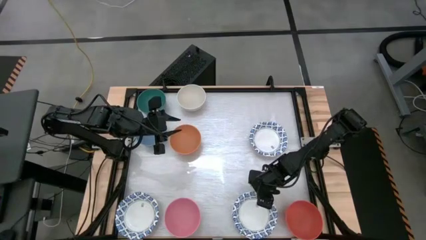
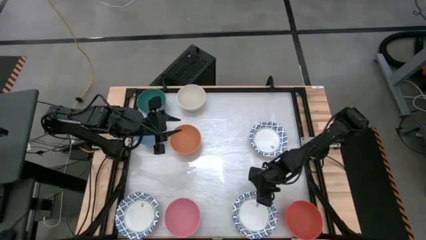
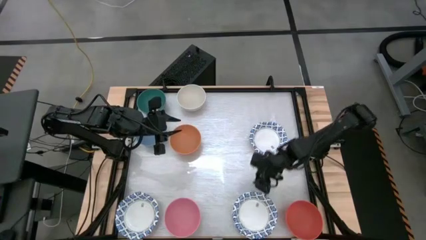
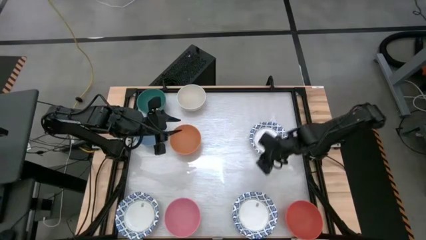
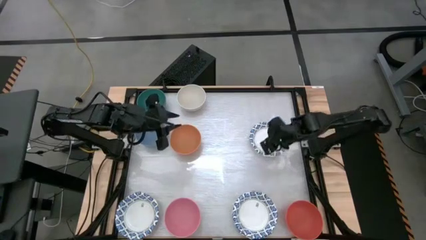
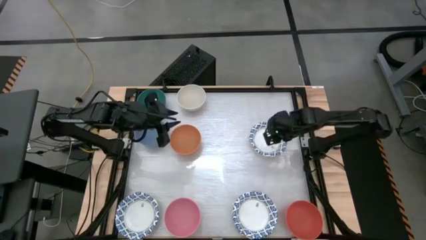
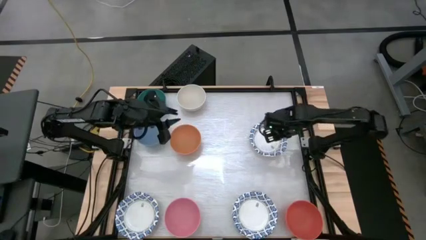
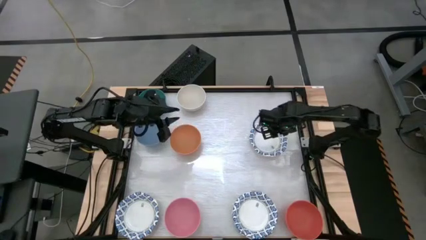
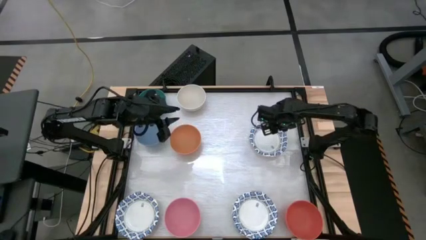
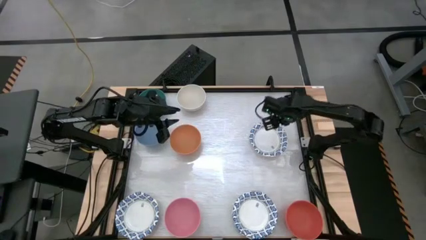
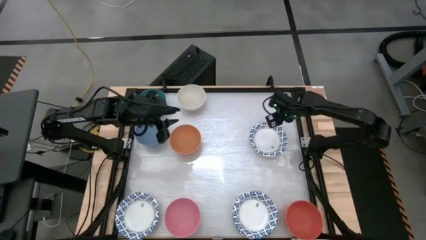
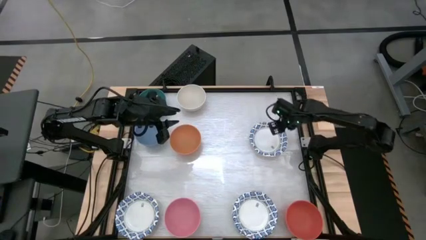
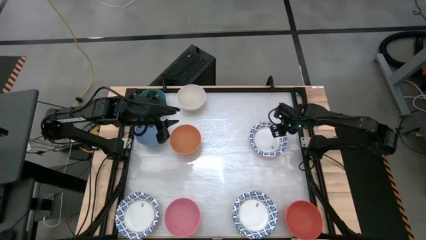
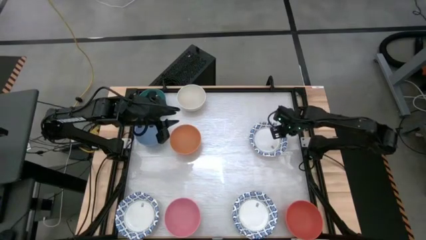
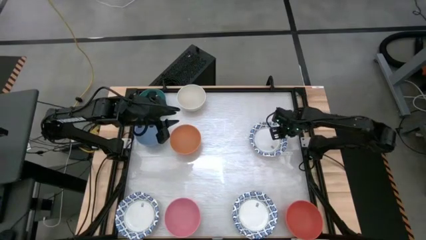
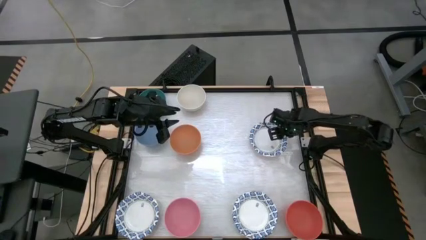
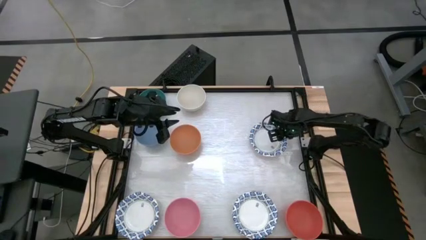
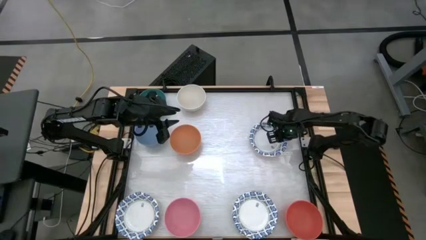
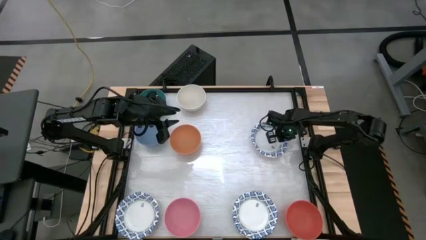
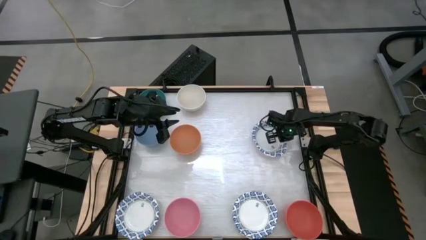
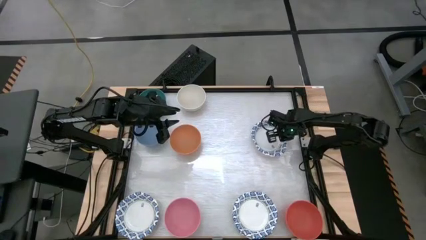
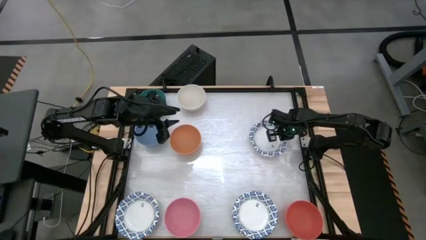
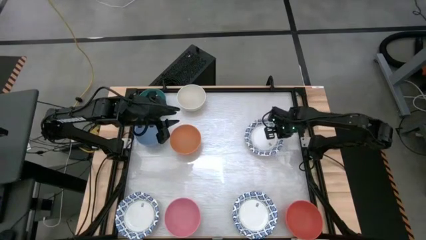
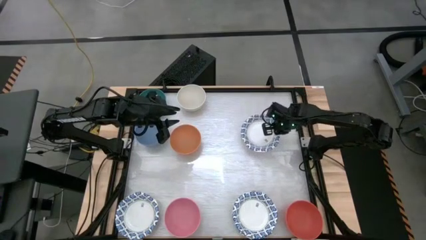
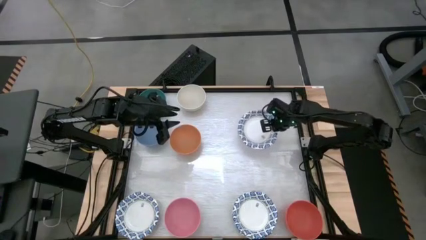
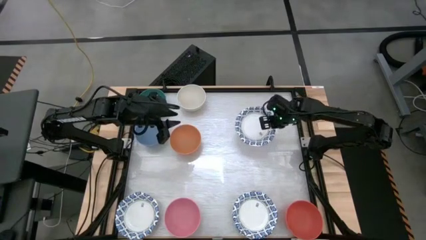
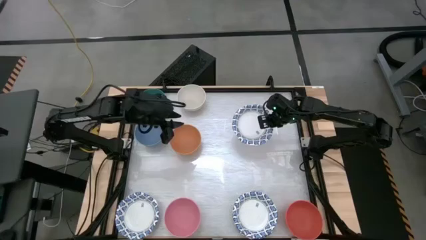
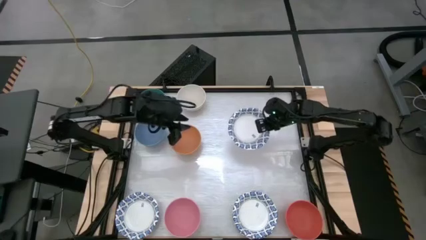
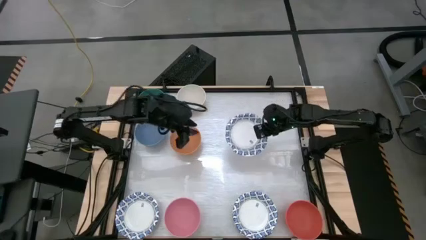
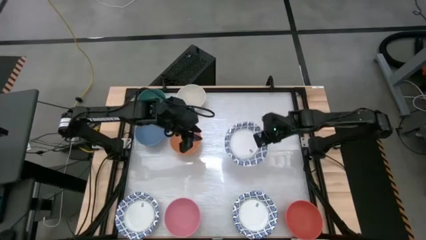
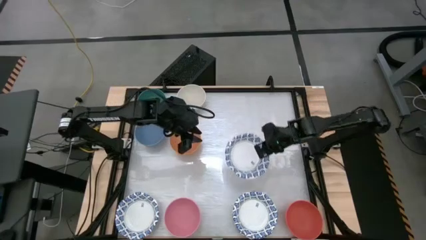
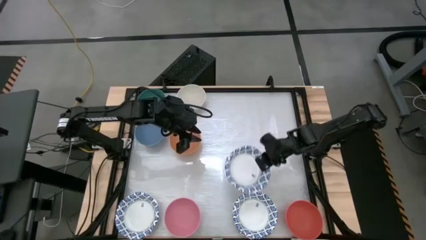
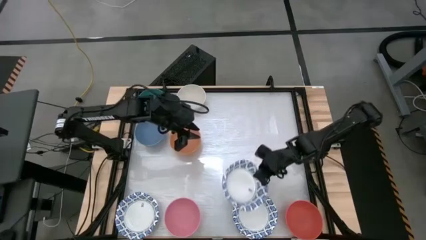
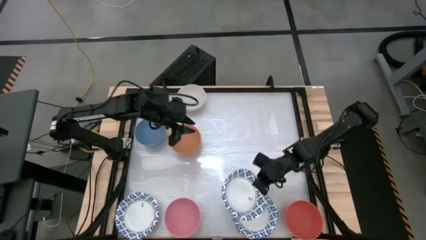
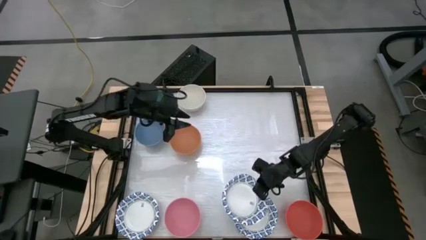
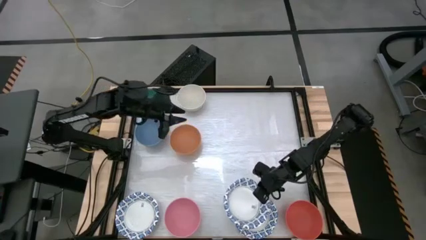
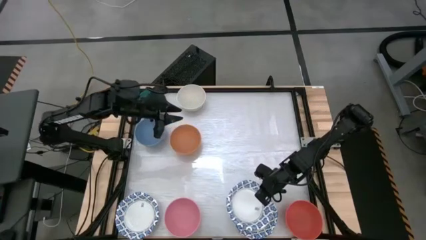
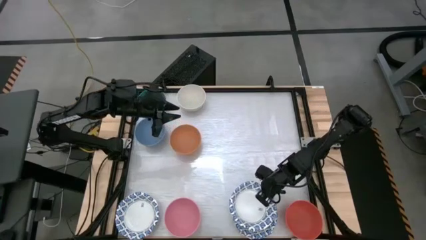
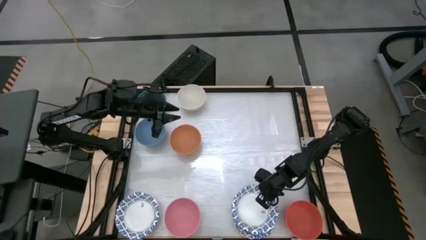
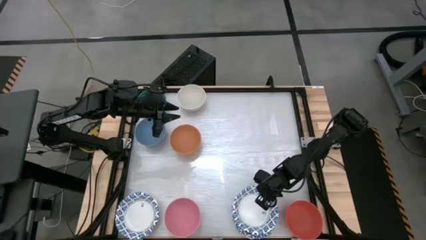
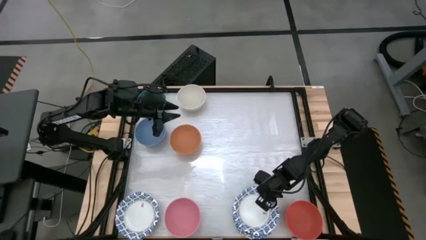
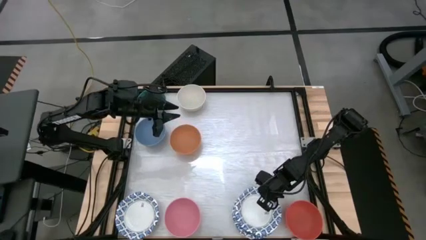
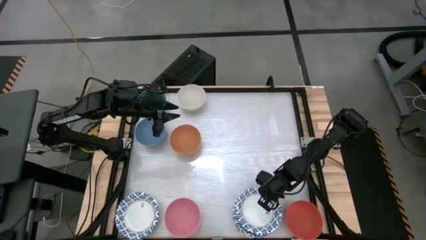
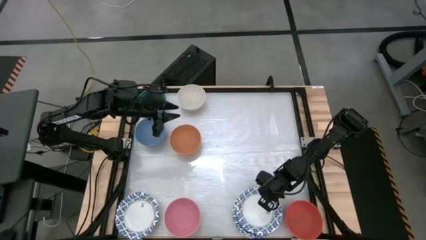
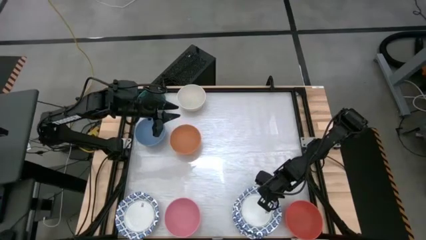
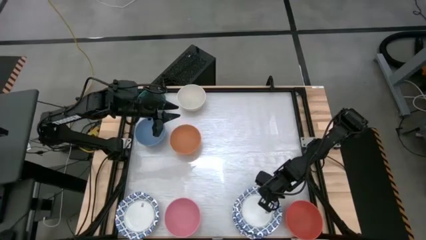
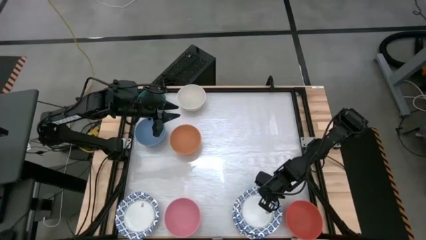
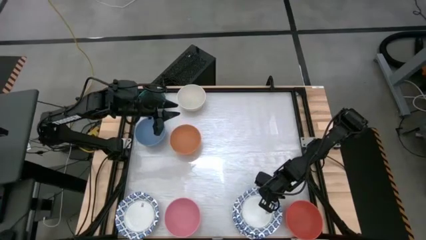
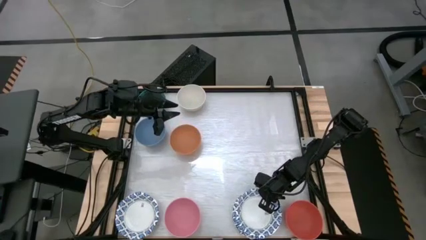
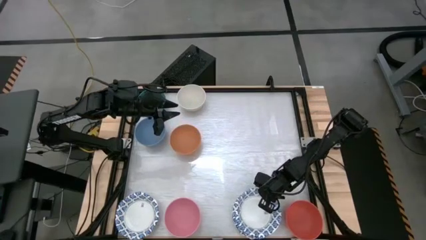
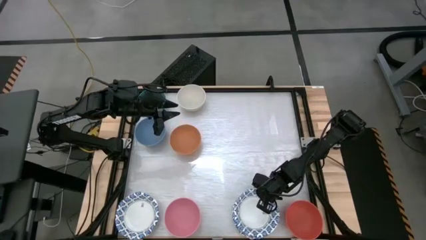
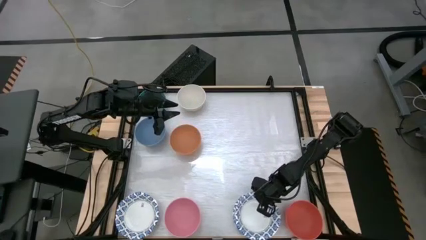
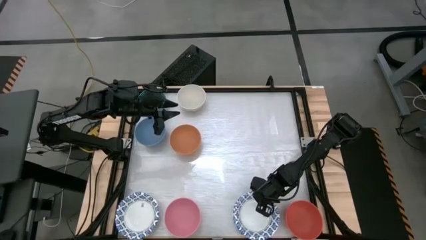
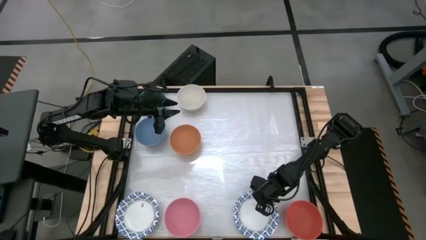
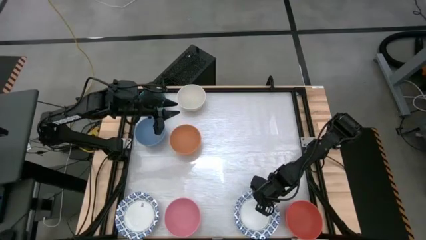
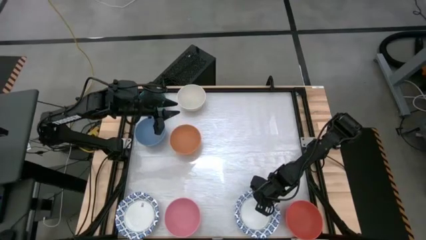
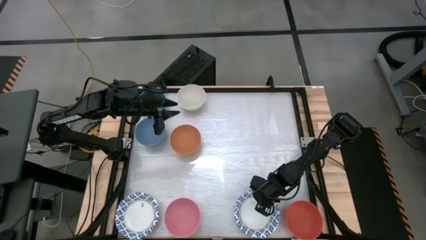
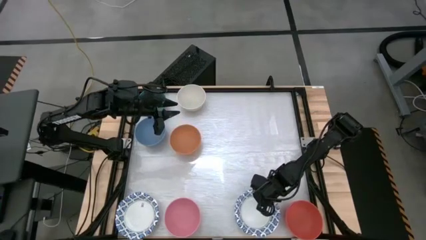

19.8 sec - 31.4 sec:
Stack the top white paper bowl on top of the bottom right white paper bowl

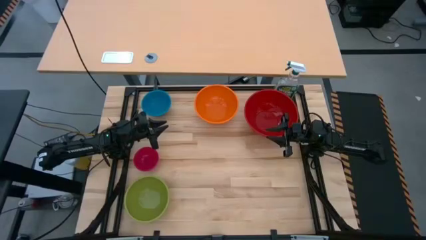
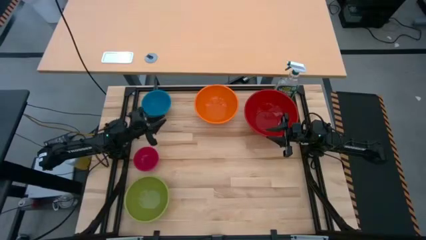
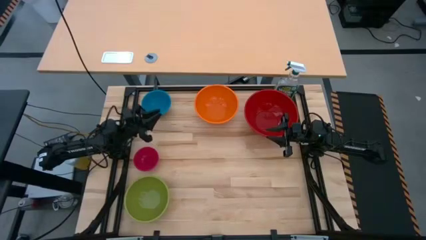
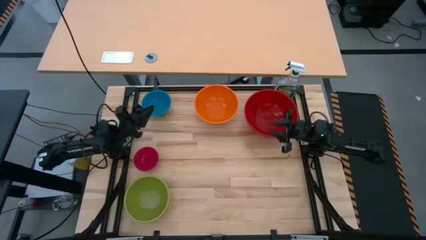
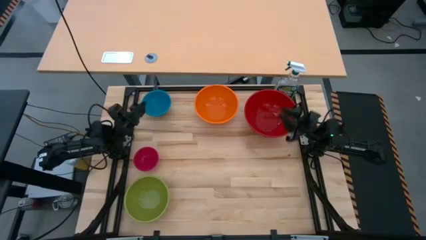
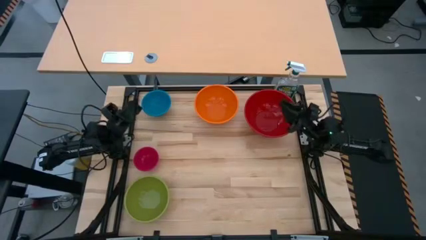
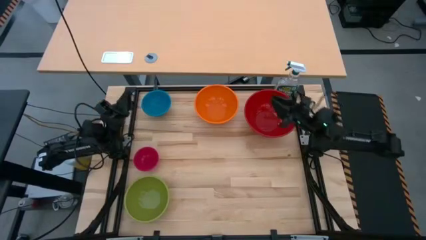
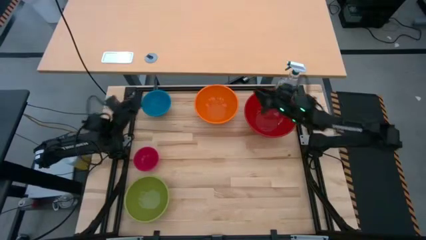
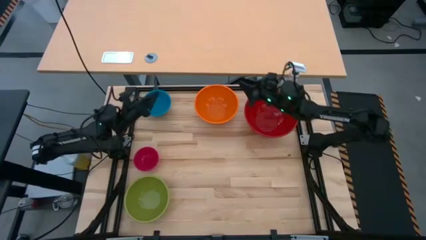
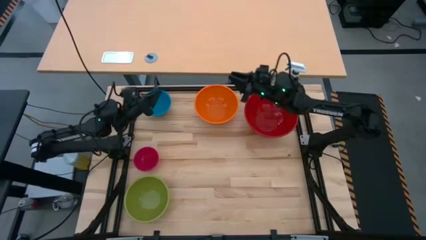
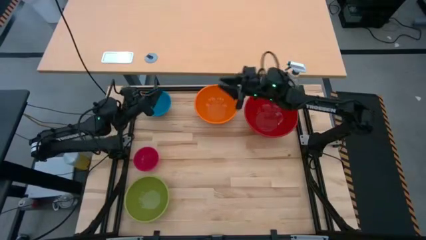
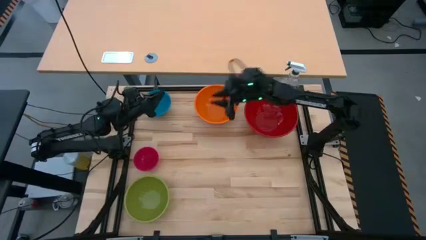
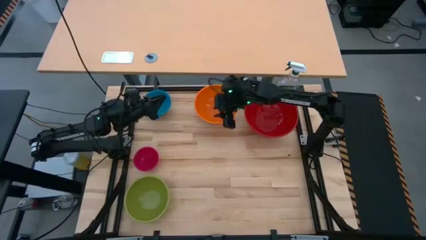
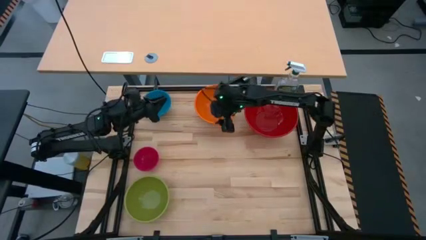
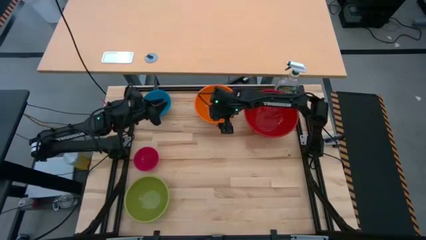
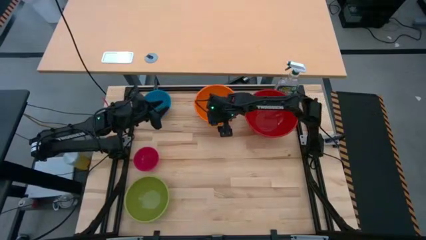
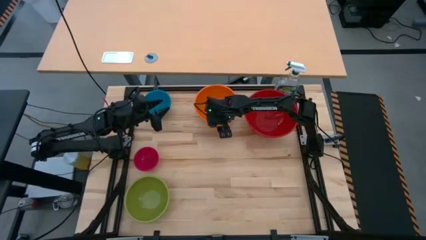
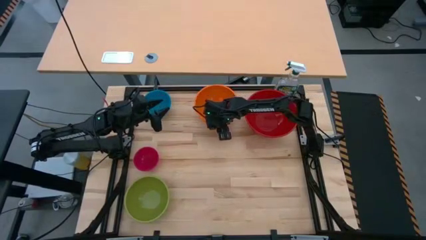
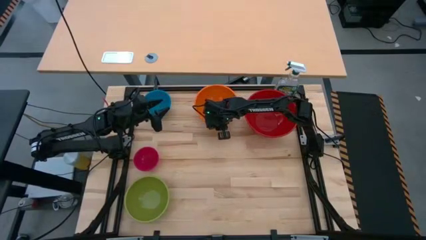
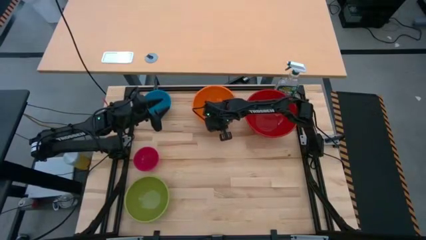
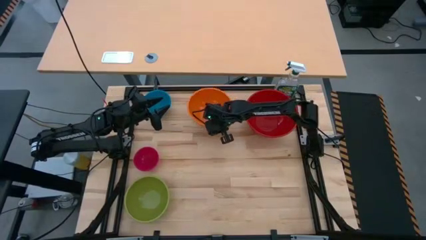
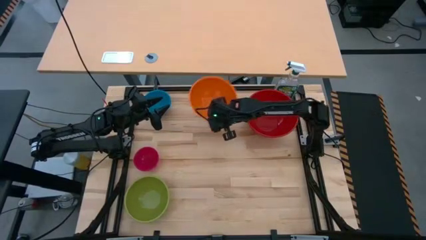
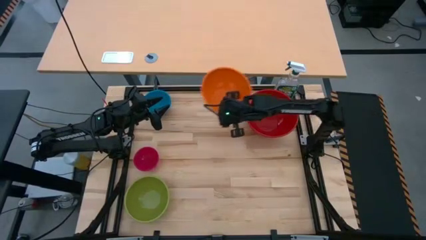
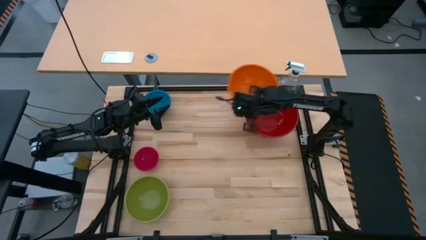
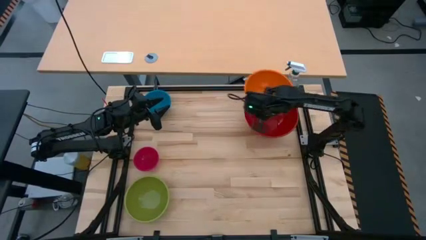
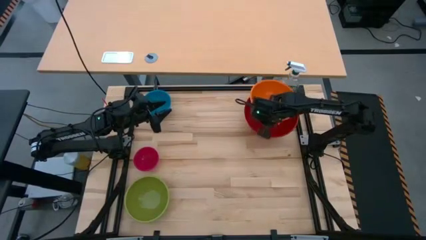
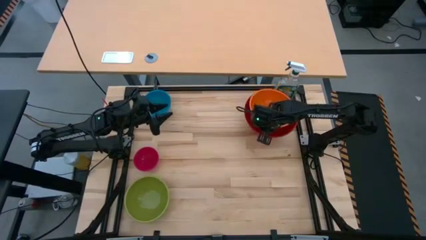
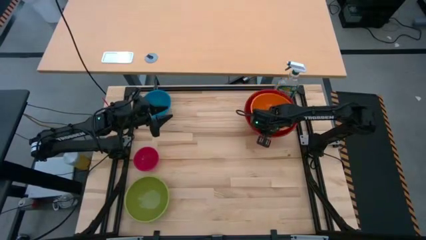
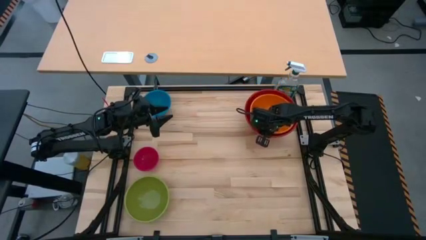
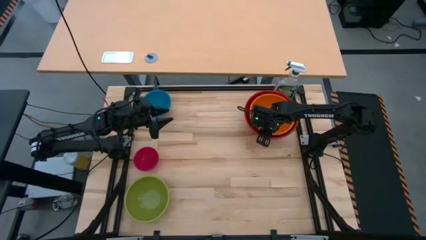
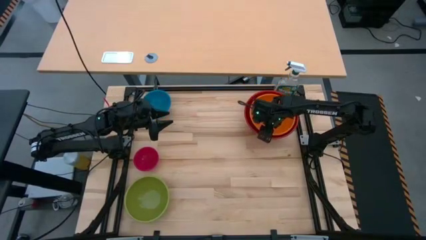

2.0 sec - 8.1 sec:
Stack the orange bowl on the red bowl
